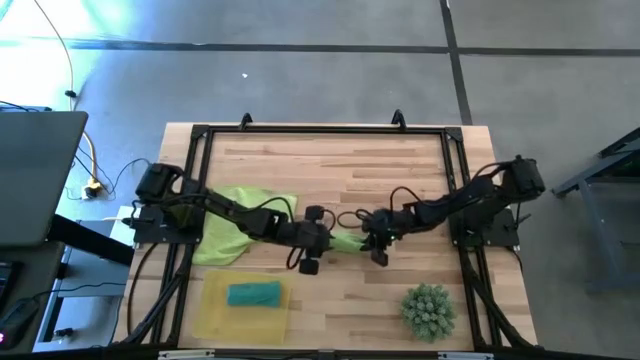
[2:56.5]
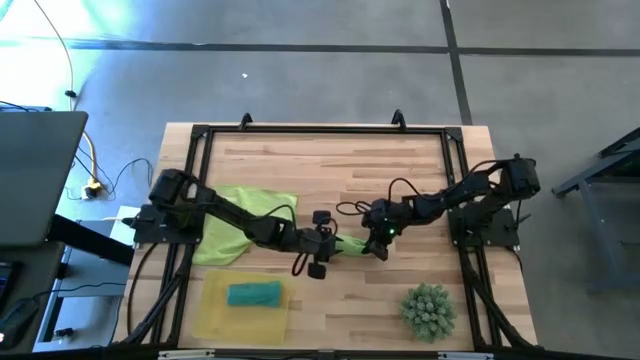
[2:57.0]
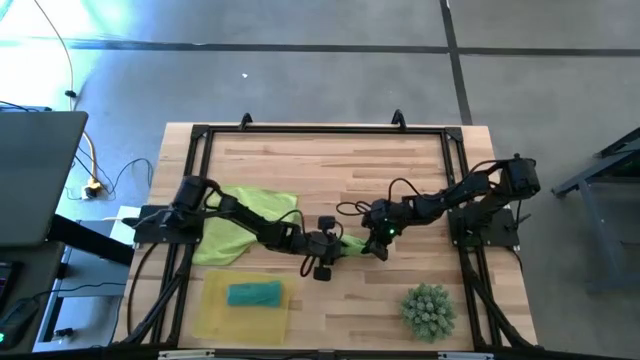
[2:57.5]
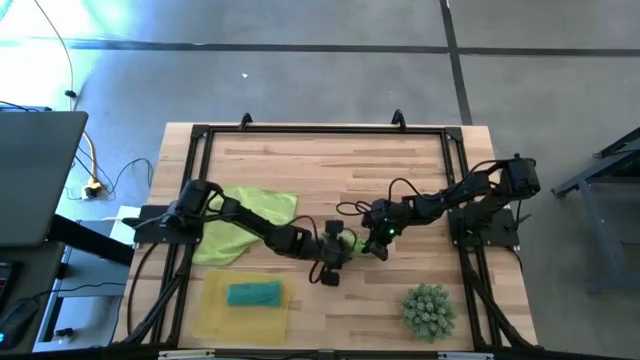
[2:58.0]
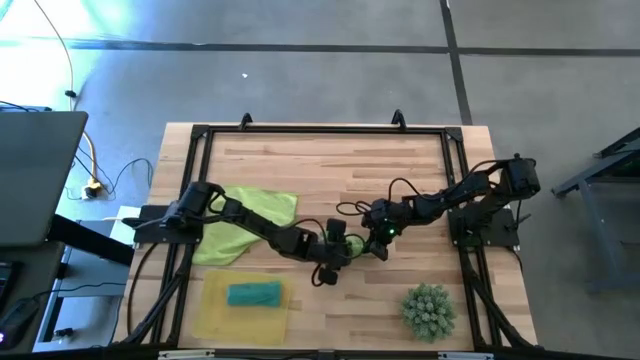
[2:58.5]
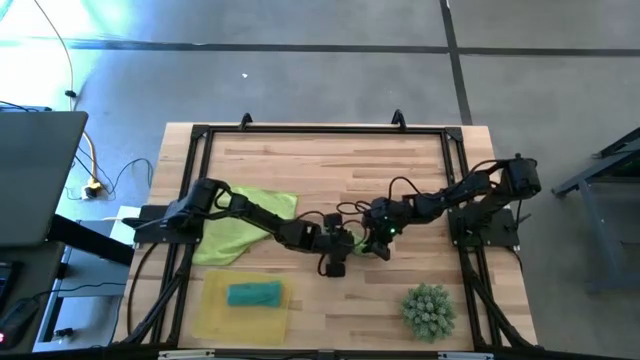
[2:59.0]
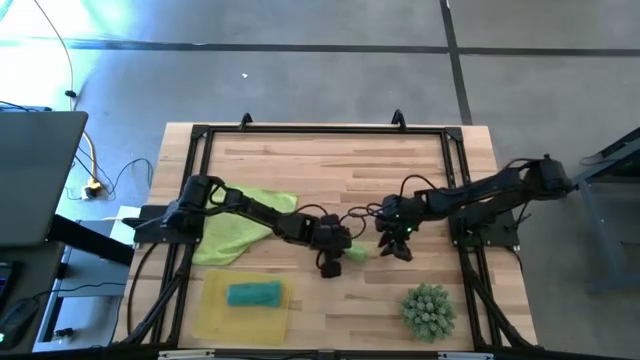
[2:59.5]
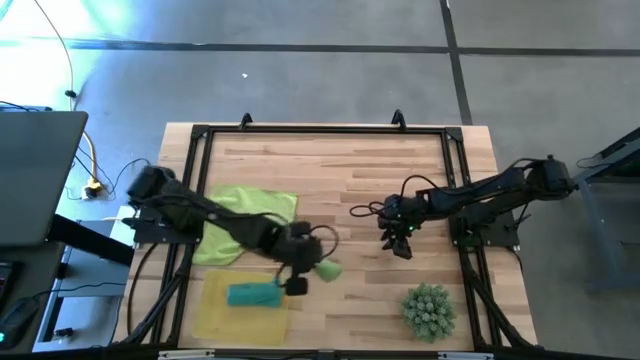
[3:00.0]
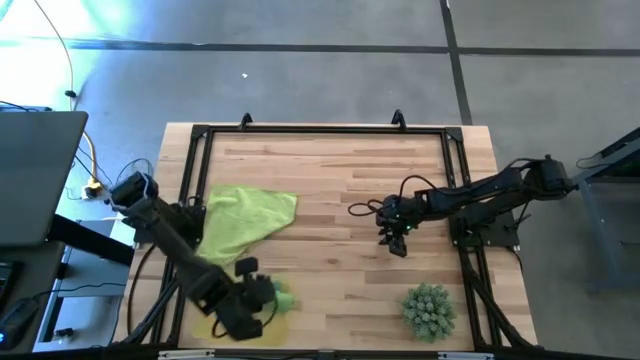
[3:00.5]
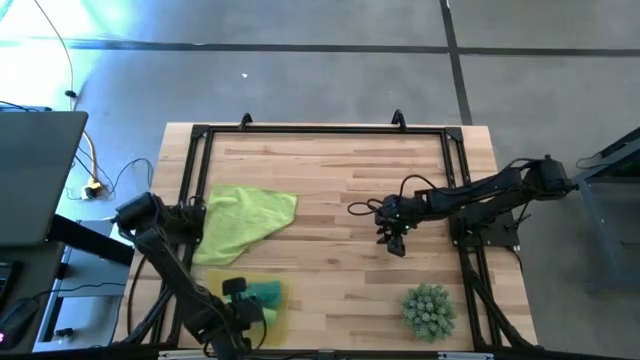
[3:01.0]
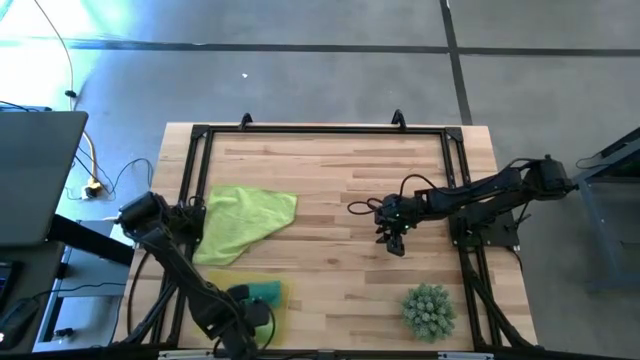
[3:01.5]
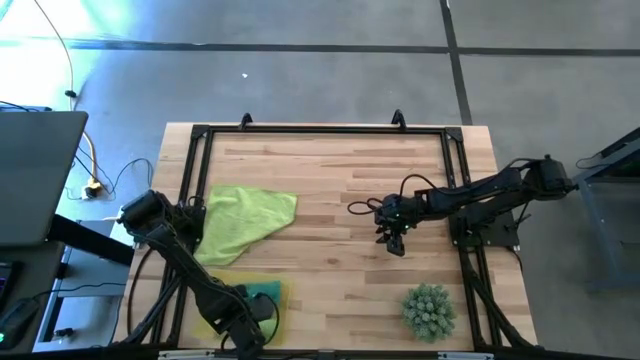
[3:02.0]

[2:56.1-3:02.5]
Task: Roll microfiber towels into tight, uniform cylinder then place into a basket
Put the green microfiber towel into the yellow bin

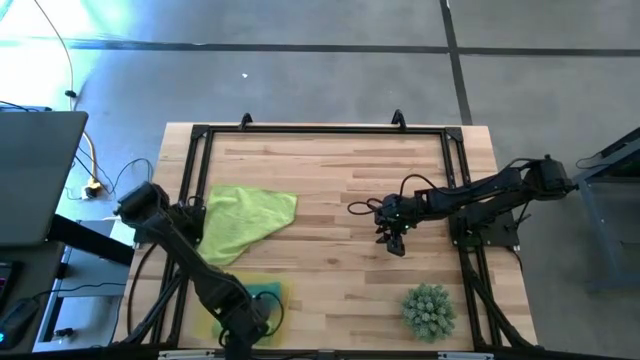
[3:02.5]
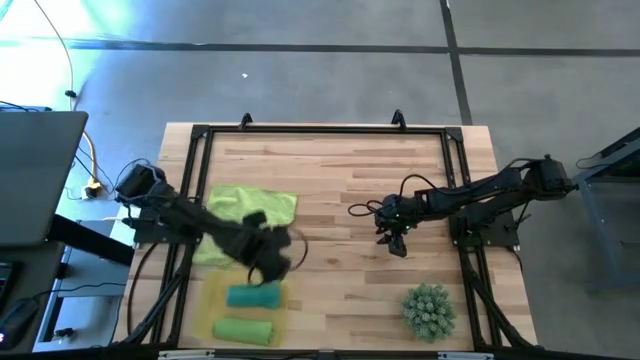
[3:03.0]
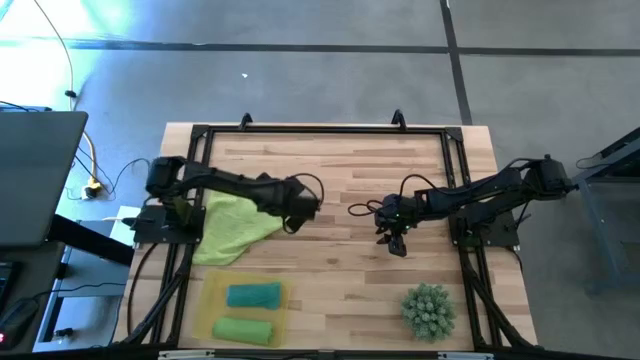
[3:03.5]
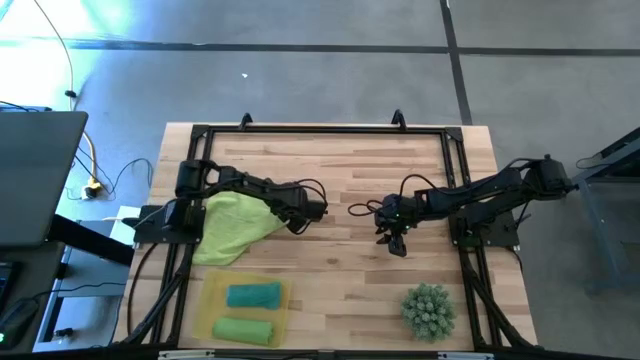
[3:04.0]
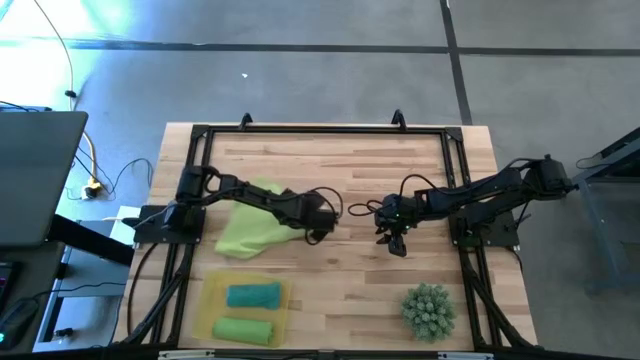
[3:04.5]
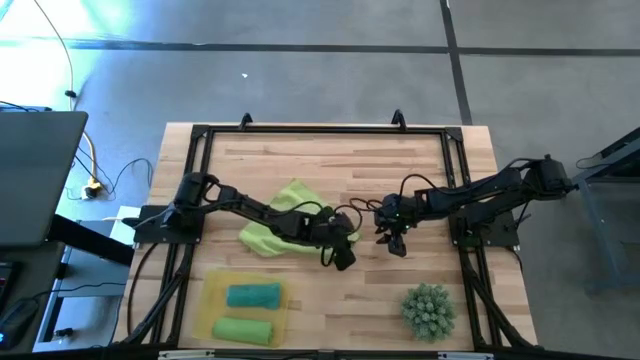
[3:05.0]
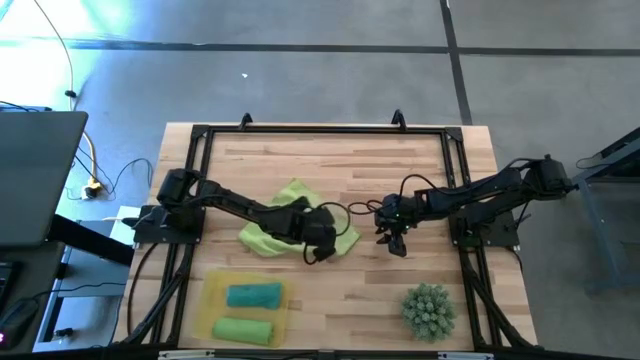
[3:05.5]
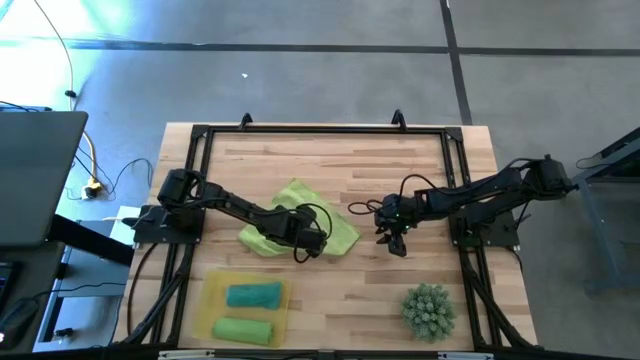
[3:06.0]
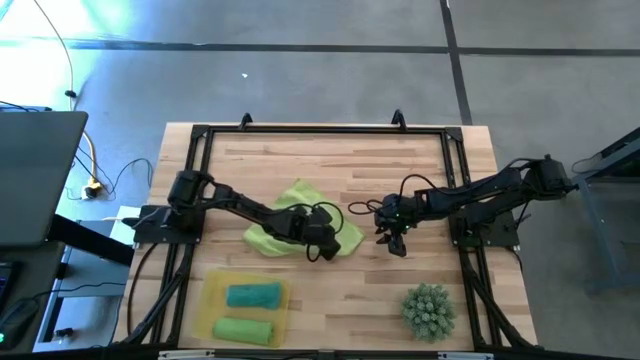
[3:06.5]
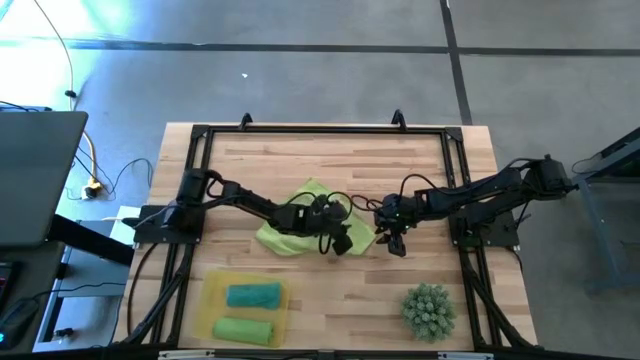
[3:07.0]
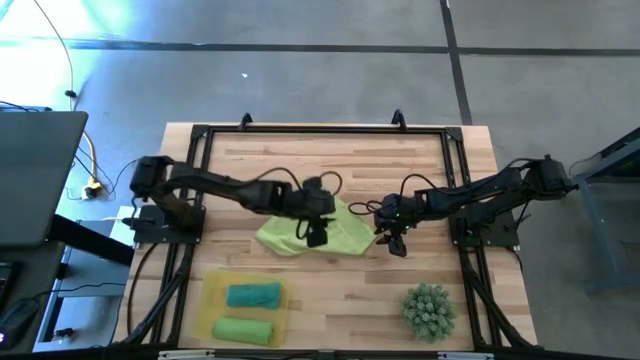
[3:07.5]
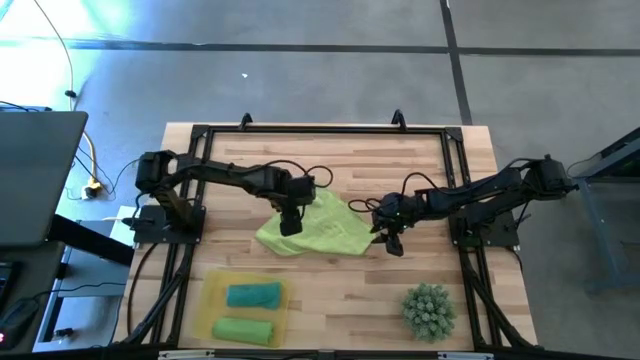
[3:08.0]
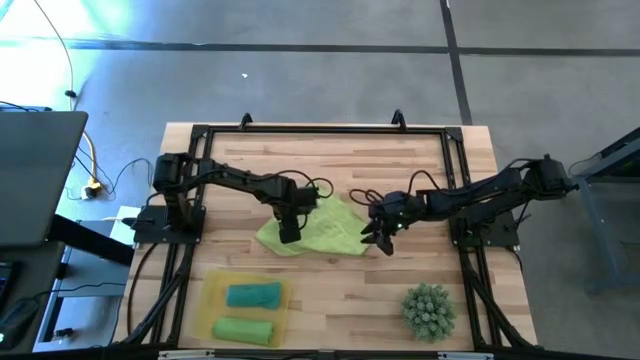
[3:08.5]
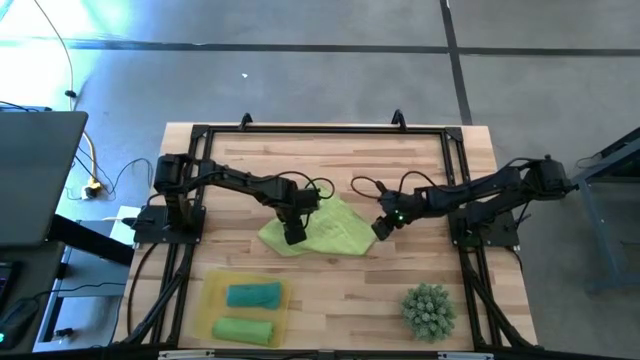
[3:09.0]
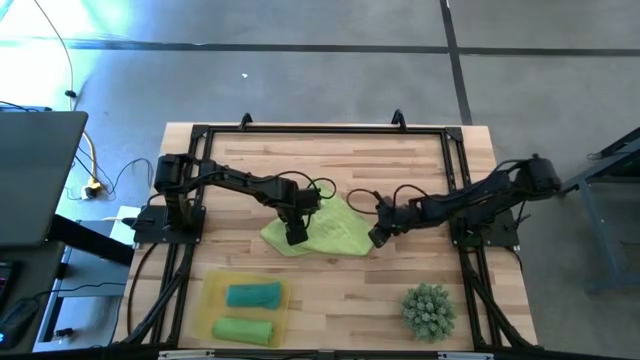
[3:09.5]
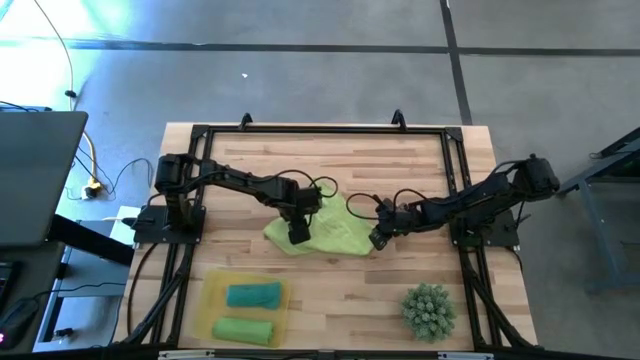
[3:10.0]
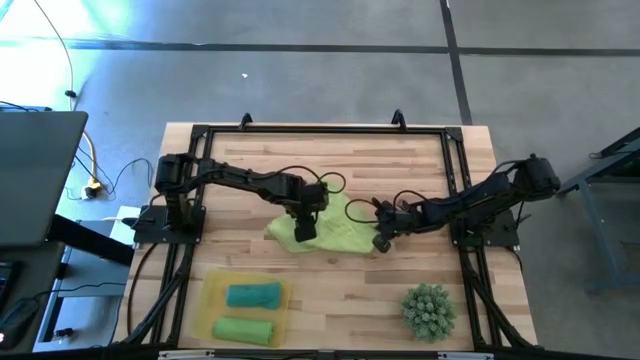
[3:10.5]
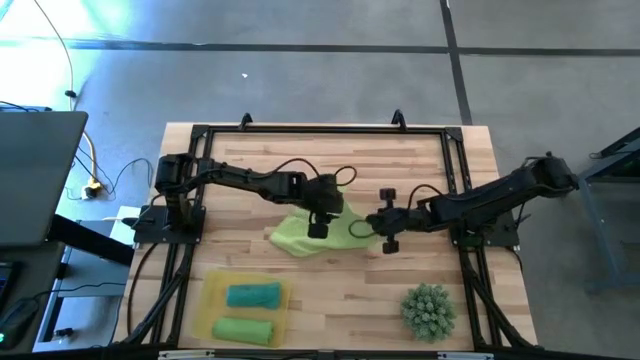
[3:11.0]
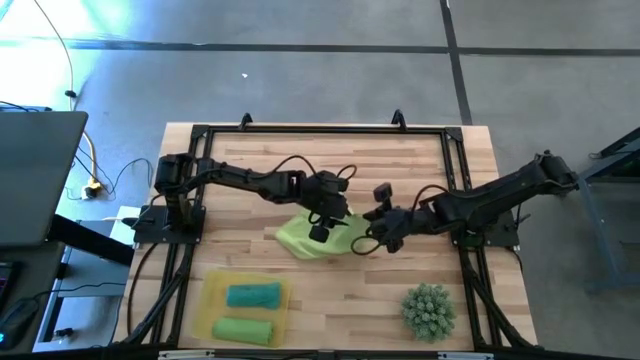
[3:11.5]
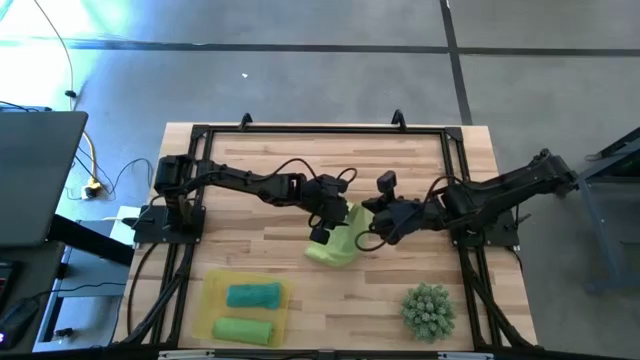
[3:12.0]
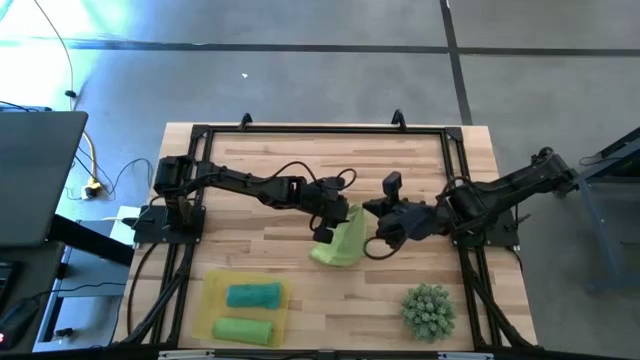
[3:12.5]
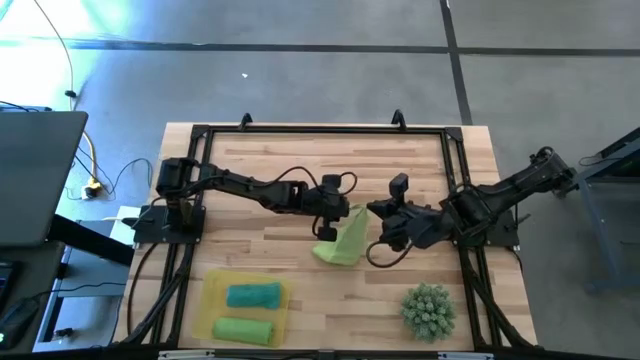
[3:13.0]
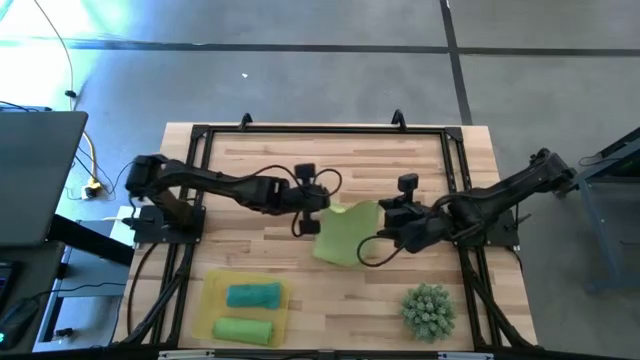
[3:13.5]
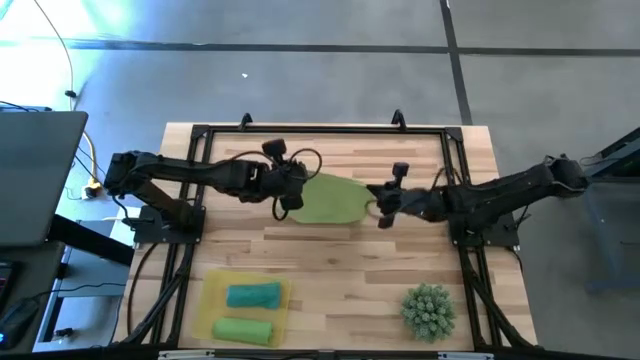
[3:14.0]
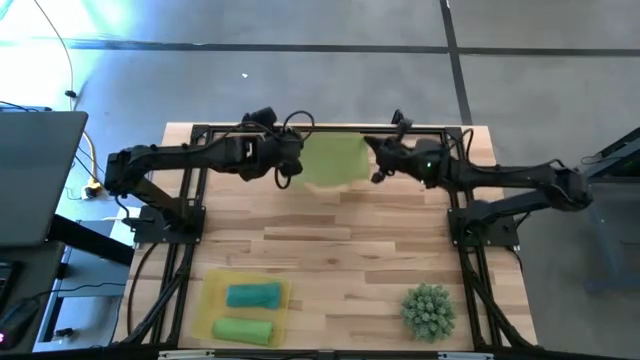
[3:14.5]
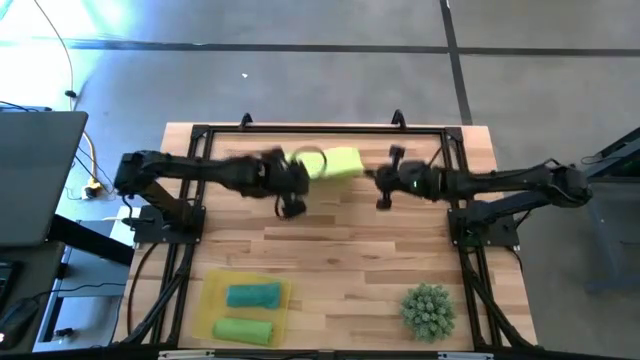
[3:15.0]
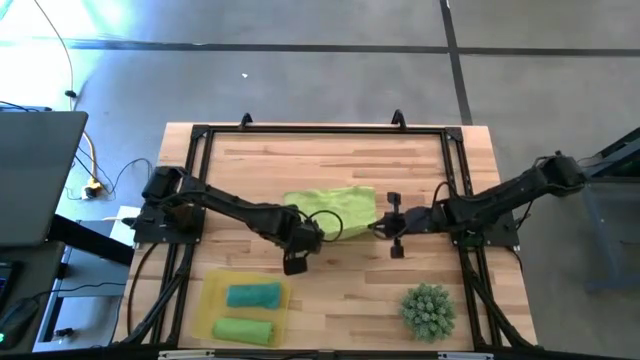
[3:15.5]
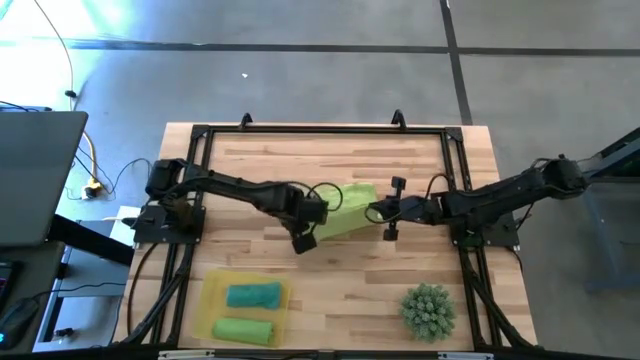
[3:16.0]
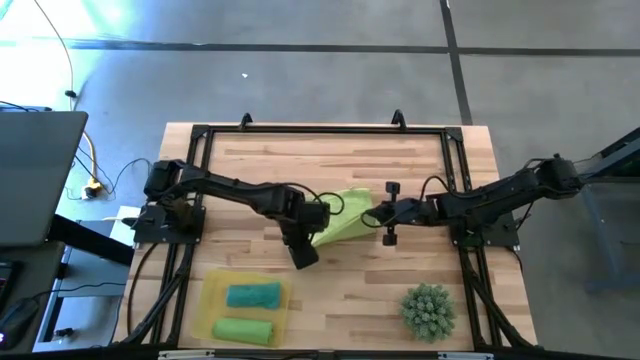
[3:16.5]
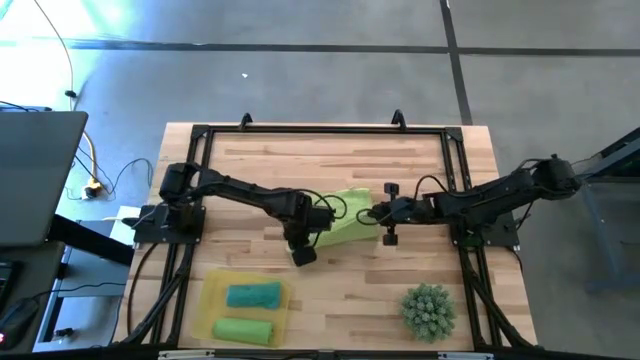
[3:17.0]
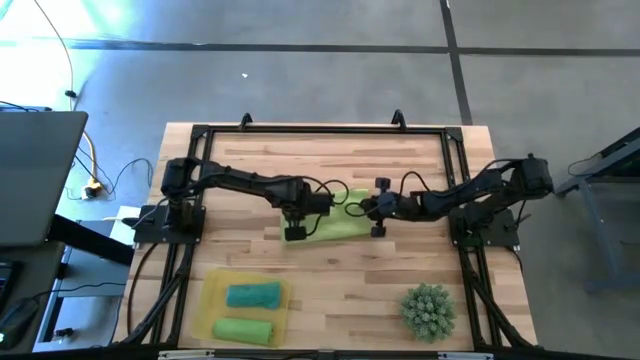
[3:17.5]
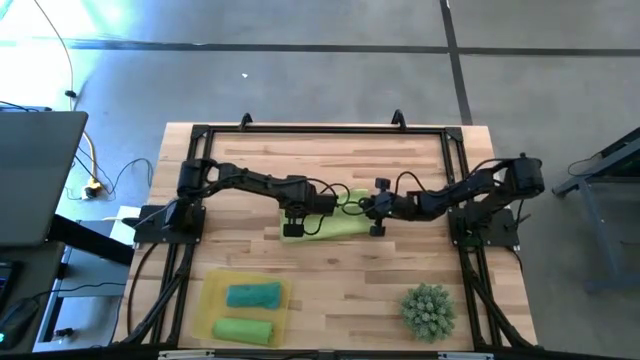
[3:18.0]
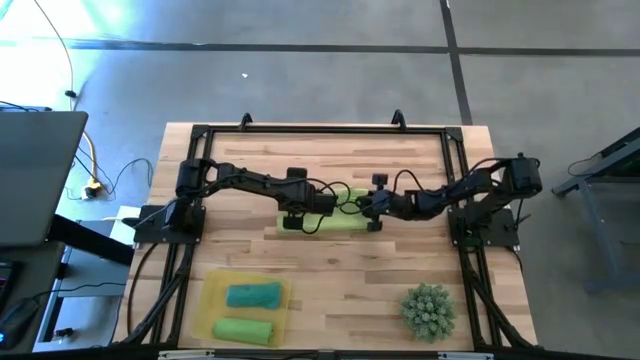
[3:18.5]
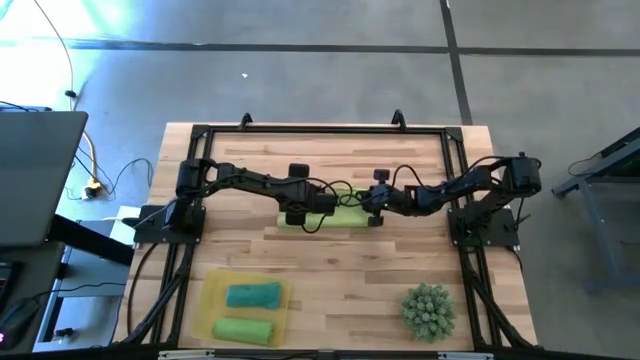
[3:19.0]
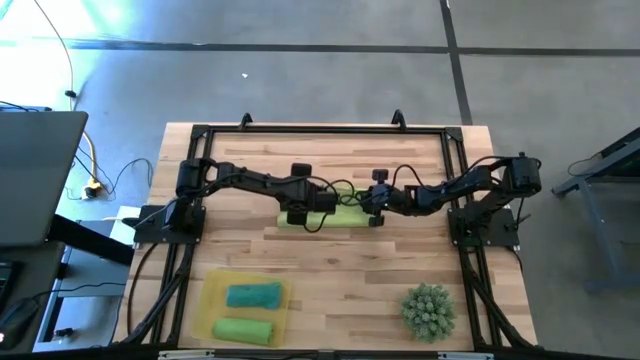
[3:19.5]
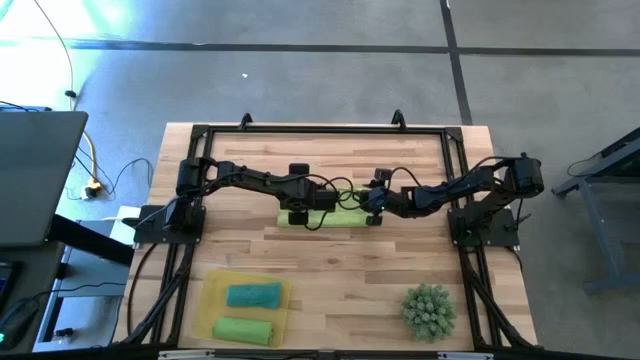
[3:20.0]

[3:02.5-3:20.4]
Fold the light green microfiber towel
